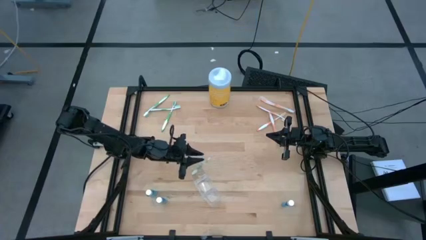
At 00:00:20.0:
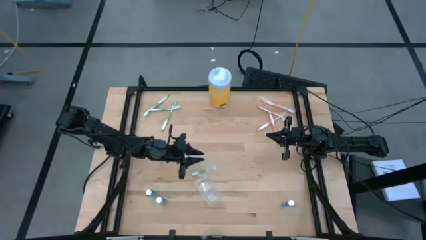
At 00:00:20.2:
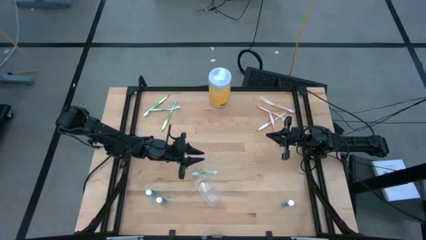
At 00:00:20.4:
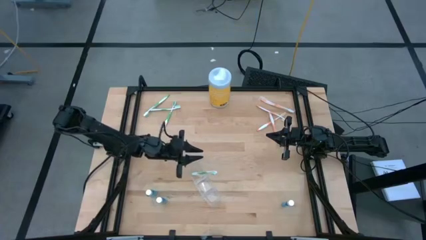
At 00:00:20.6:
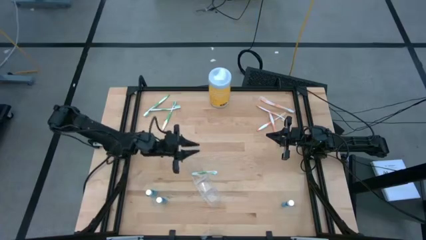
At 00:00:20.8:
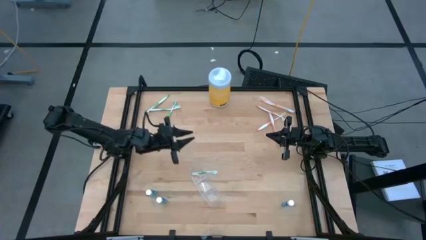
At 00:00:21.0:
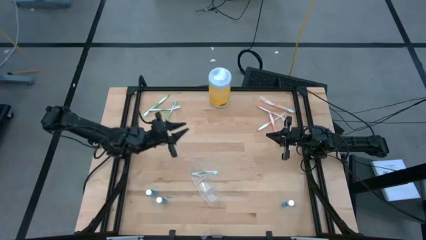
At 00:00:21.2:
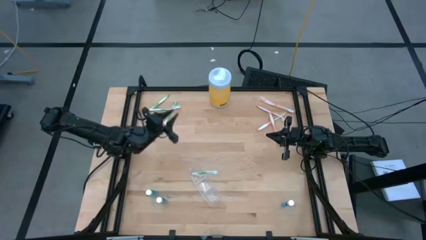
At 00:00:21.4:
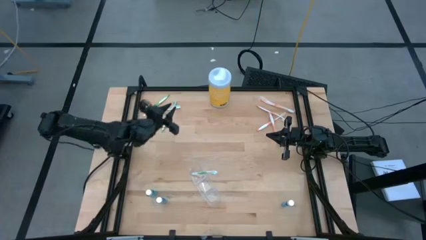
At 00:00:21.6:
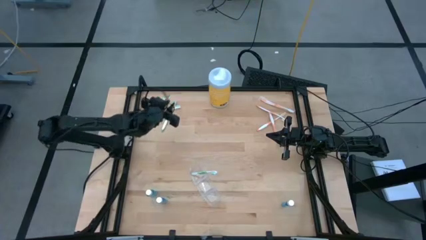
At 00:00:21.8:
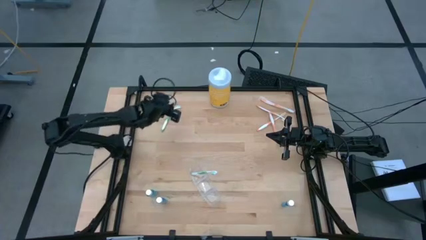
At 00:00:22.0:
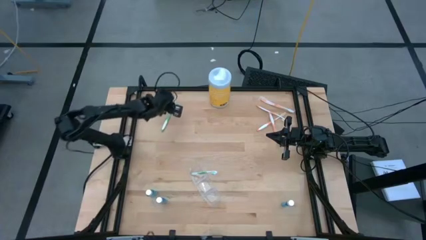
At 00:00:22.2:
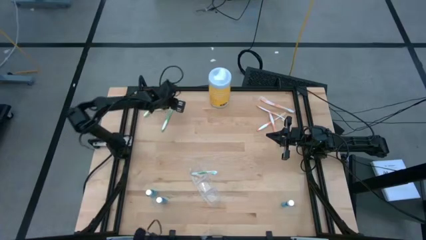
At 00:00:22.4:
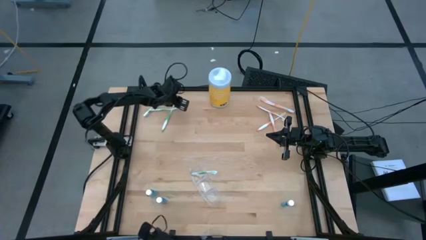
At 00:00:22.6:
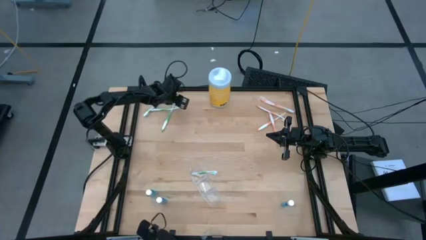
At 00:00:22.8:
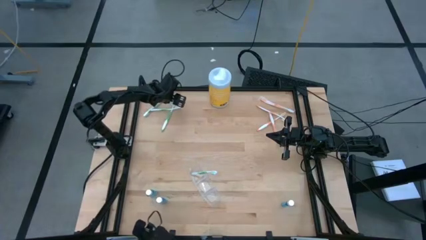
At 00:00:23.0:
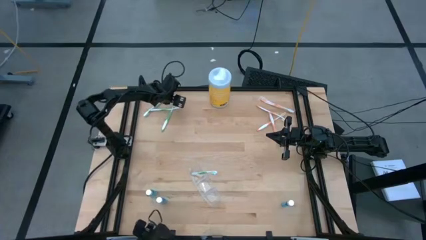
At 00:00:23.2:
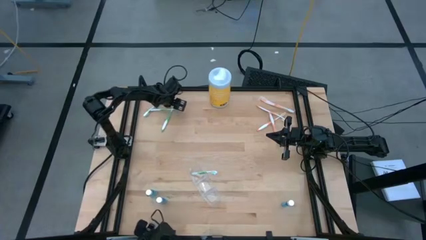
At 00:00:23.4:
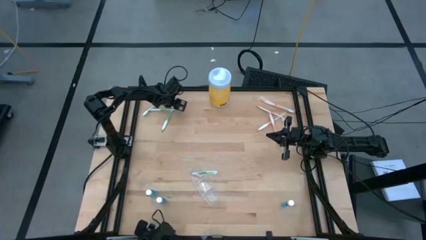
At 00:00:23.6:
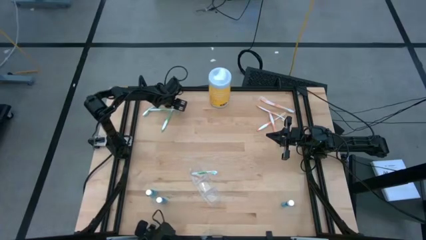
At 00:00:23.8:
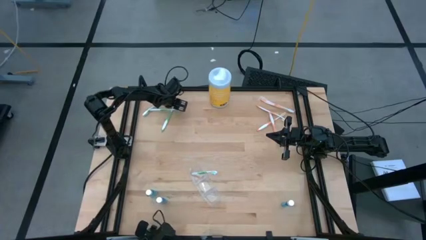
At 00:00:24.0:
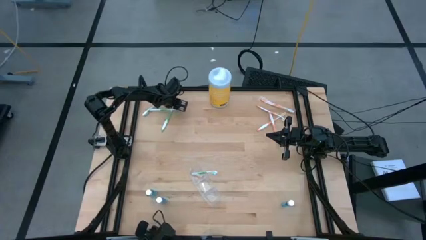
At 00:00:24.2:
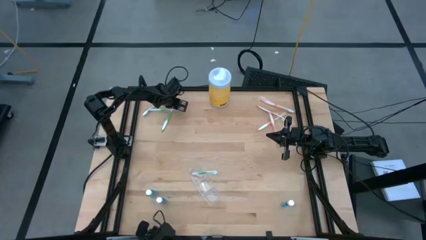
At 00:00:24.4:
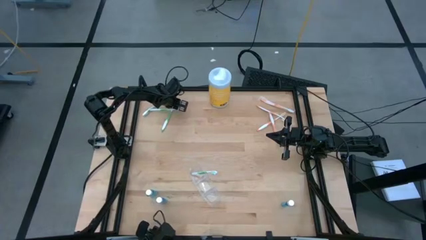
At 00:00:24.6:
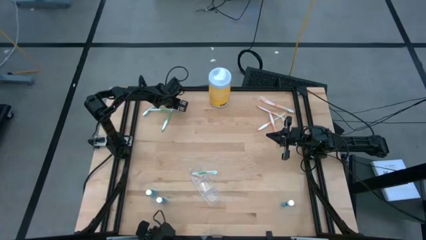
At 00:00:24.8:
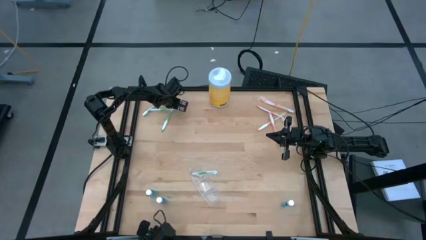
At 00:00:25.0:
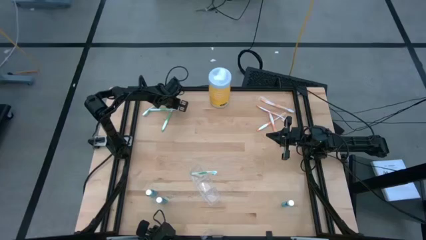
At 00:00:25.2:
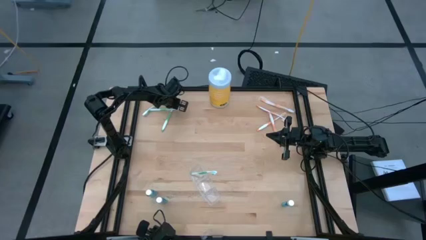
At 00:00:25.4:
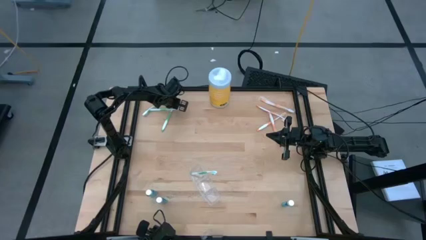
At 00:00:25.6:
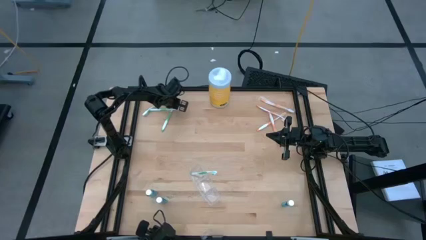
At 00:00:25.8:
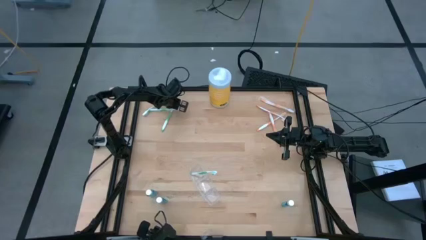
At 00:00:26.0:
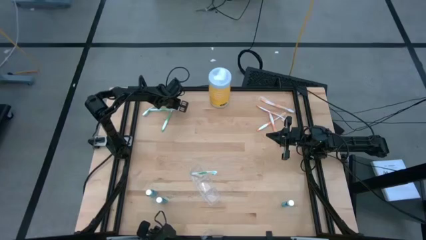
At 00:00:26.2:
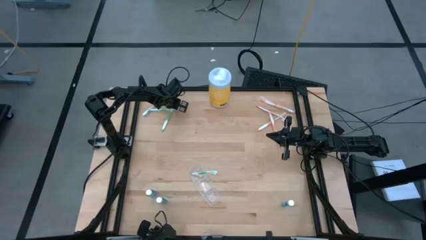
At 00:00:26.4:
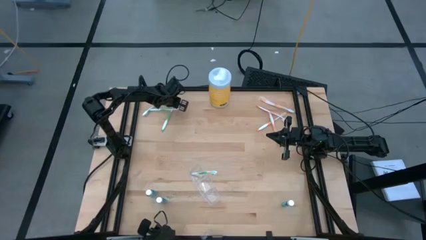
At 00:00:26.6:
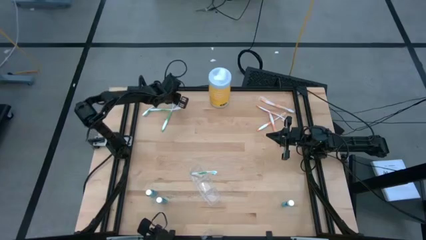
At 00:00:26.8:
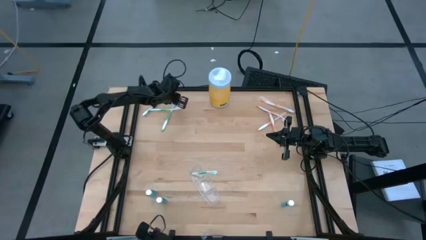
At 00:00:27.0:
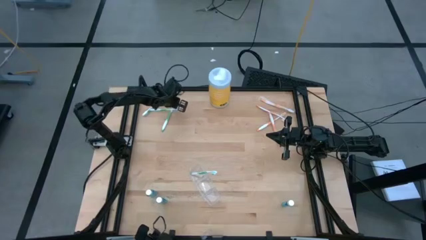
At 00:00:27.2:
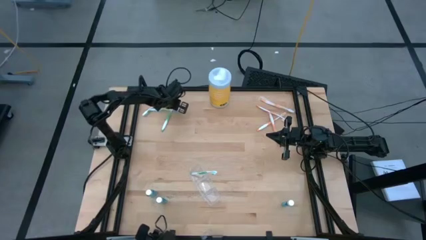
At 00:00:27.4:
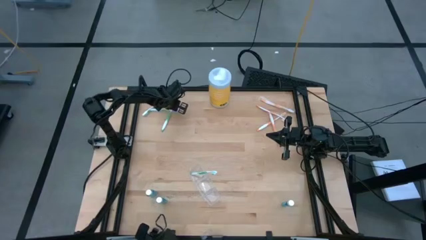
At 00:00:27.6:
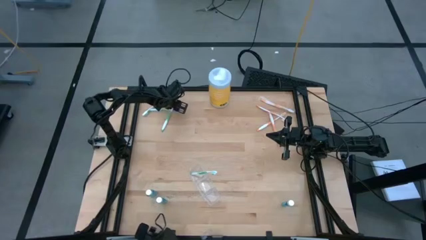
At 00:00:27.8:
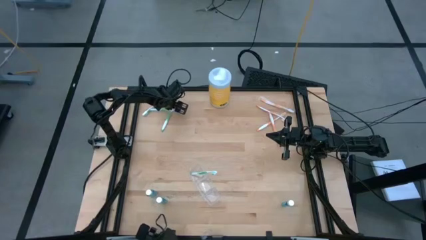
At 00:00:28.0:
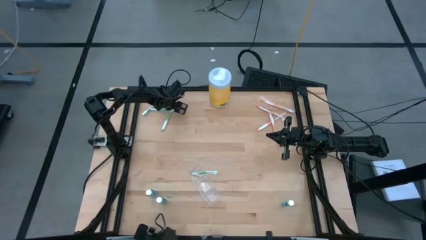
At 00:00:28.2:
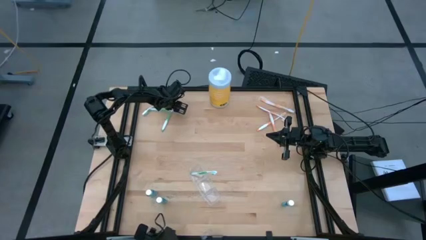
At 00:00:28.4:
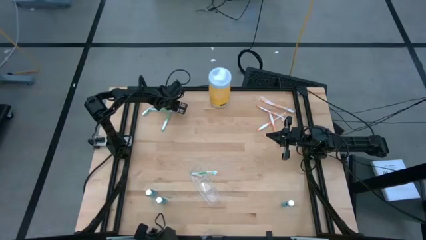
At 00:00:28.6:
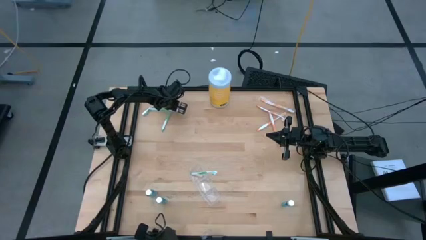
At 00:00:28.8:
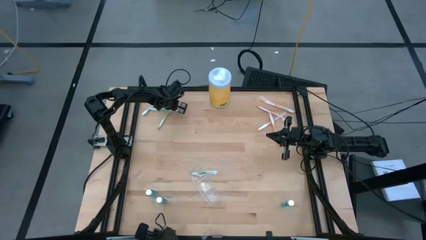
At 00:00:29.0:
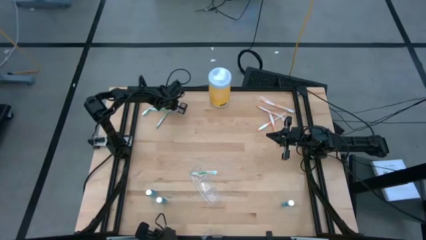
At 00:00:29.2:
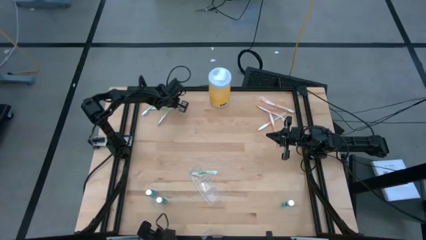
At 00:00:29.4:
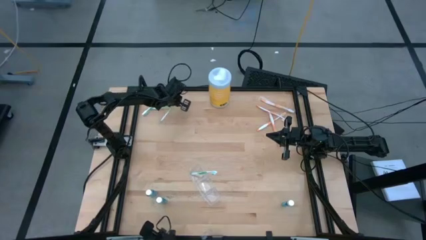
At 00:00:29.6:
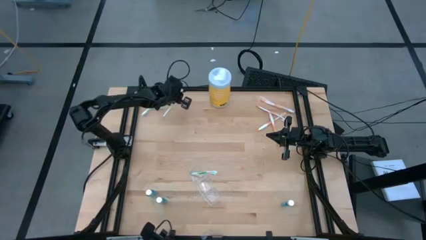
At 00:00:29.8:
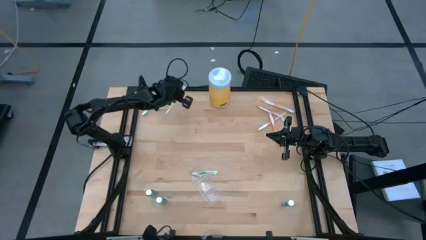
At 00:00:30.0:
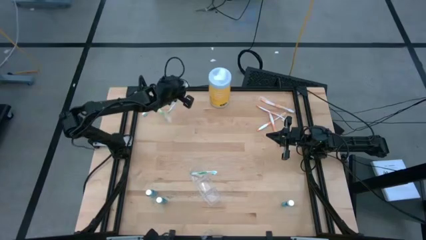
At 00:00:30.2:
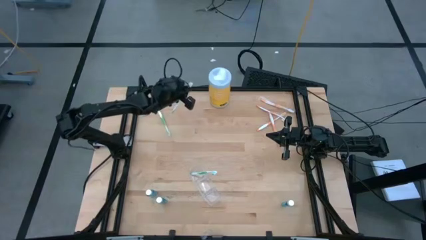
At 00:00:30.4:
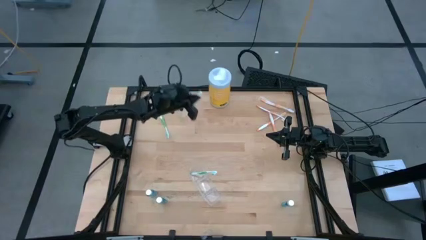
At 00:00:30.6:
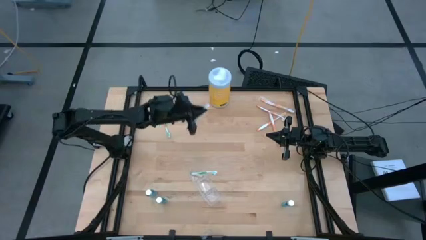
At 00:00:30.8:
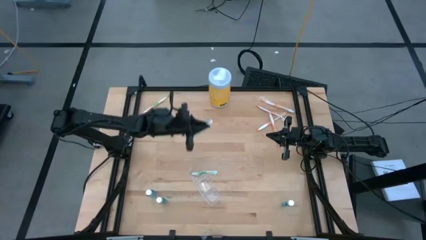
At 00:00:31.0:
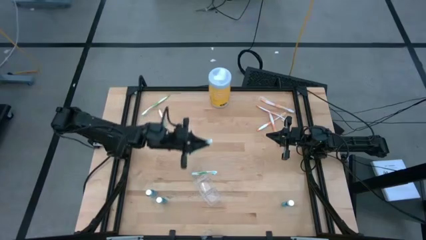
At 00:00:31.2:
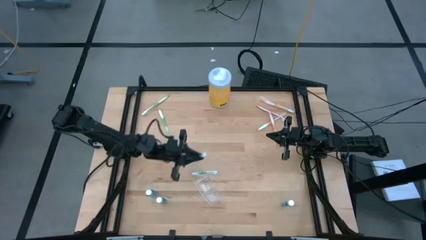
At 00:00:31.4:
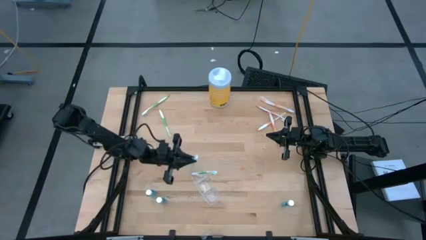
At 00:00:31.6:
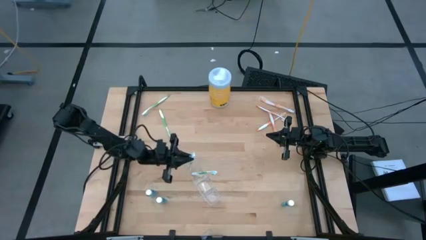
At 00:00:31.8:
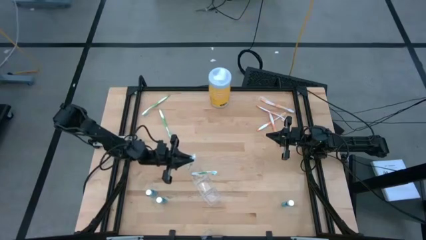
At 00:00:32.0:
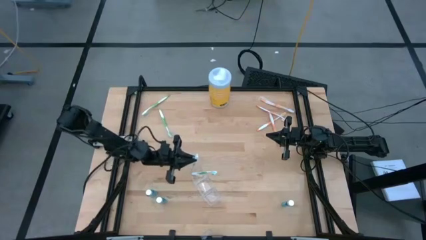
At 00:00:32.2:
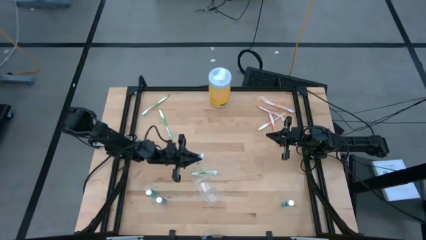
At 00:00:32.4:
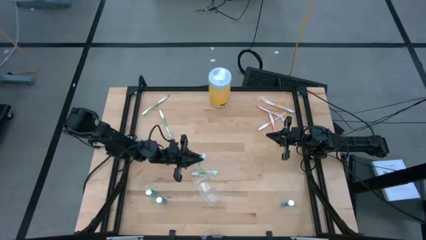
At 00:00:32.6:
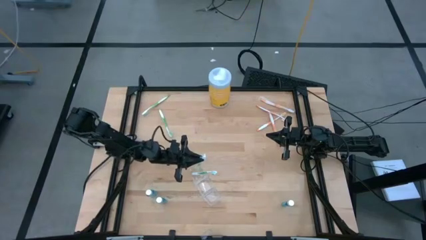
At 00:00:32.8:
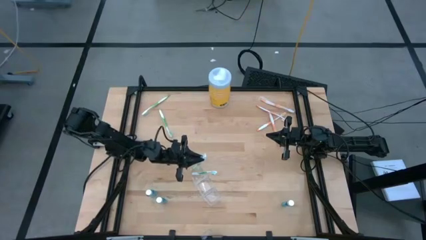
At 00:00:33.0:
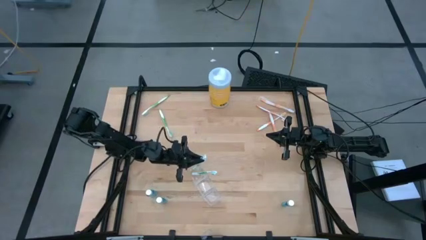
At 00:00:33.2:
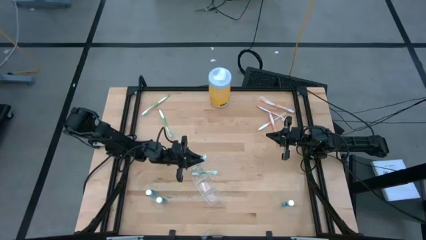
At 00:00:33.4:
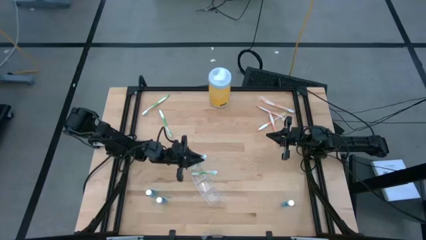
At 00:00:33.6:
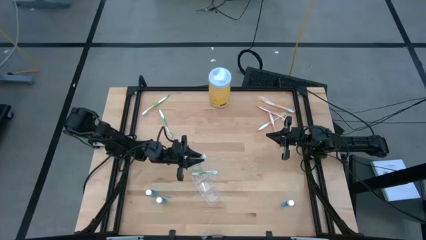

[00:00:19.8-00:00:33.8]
Task: Pick & Place toothbrushing station
Put the green toothbrush into the transparent organizer
